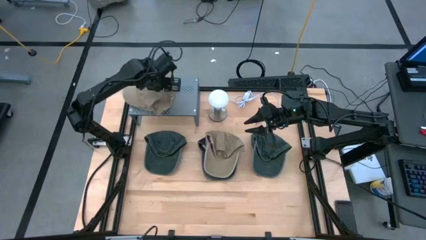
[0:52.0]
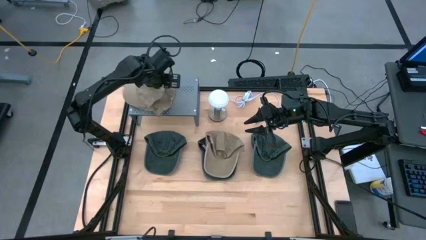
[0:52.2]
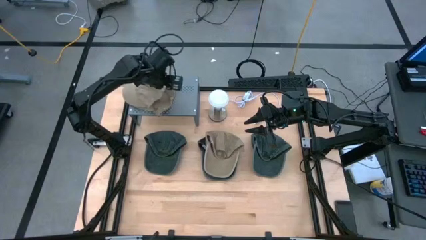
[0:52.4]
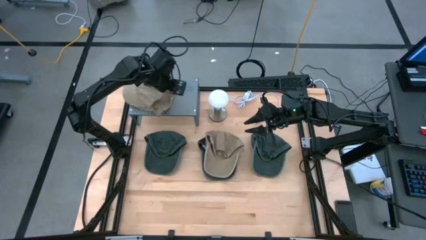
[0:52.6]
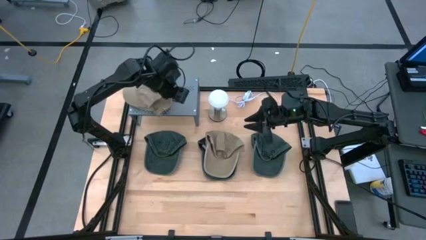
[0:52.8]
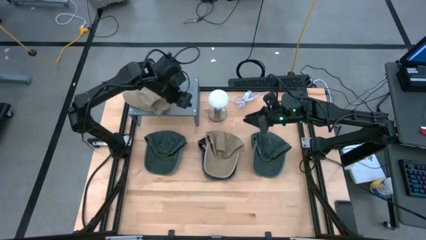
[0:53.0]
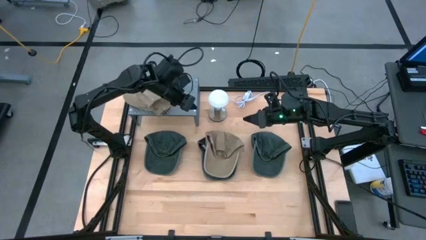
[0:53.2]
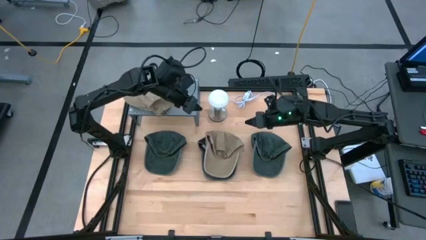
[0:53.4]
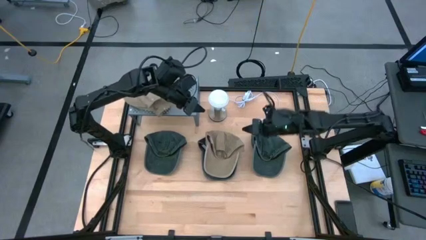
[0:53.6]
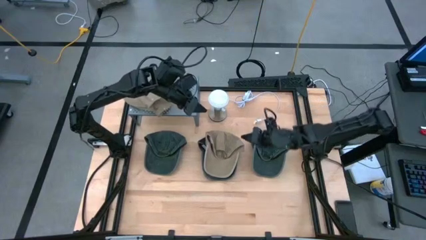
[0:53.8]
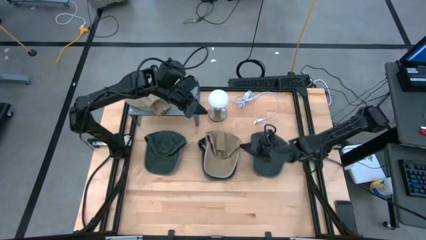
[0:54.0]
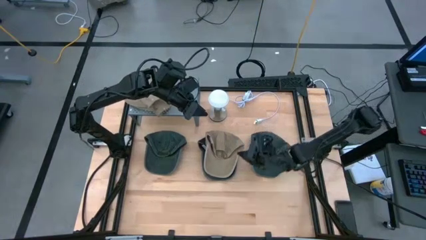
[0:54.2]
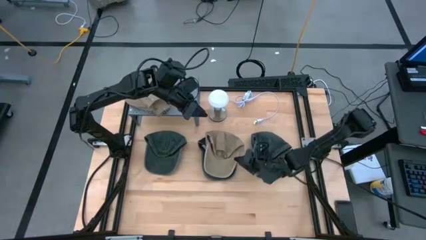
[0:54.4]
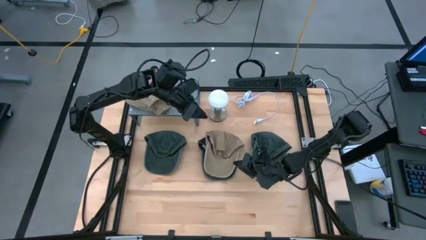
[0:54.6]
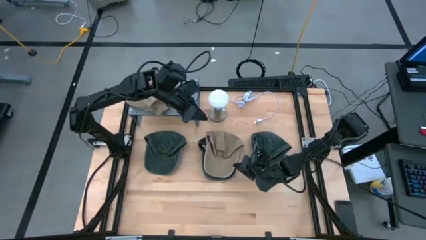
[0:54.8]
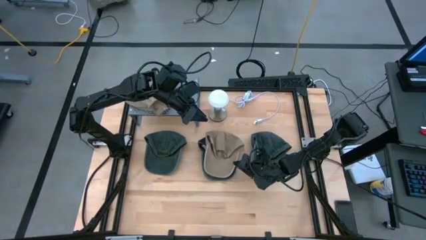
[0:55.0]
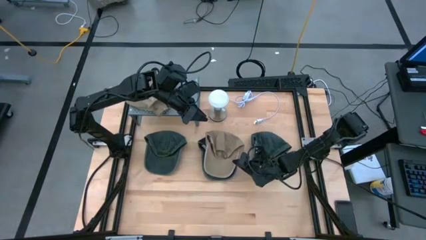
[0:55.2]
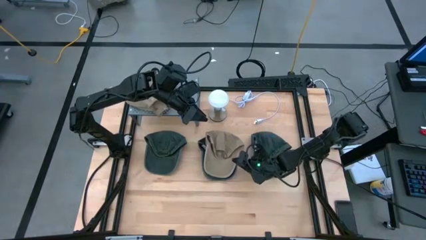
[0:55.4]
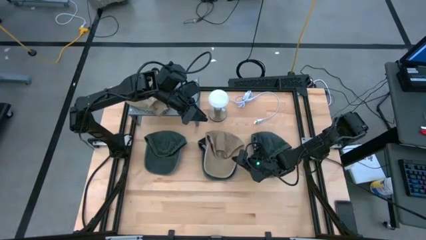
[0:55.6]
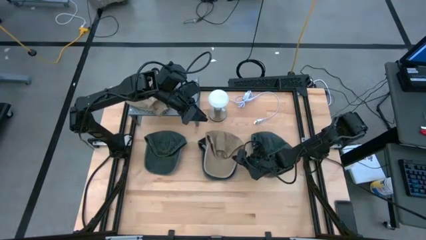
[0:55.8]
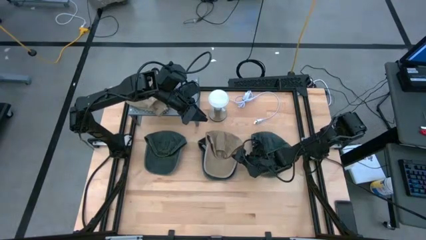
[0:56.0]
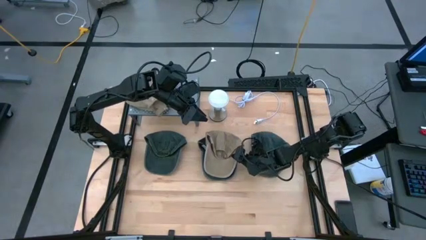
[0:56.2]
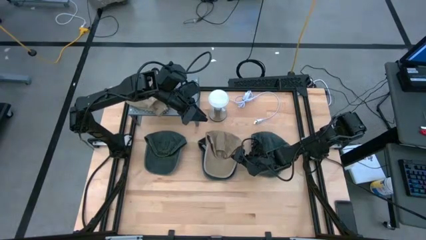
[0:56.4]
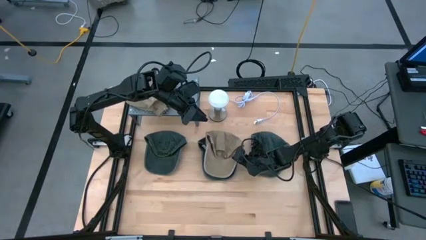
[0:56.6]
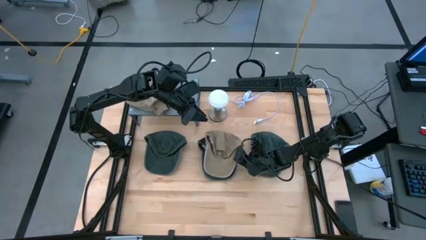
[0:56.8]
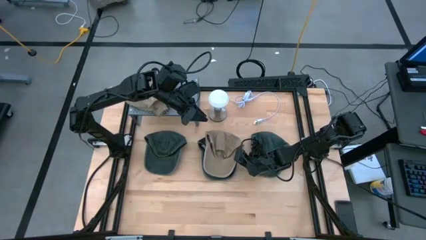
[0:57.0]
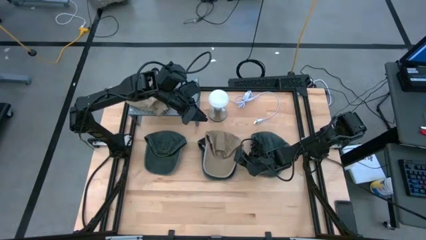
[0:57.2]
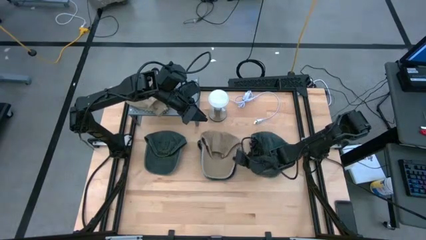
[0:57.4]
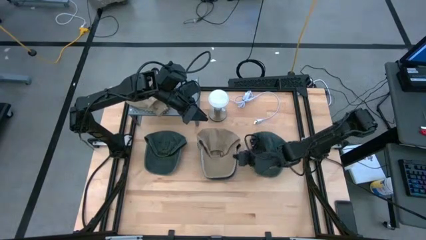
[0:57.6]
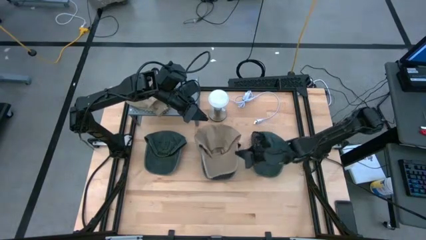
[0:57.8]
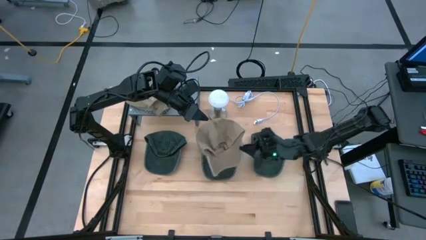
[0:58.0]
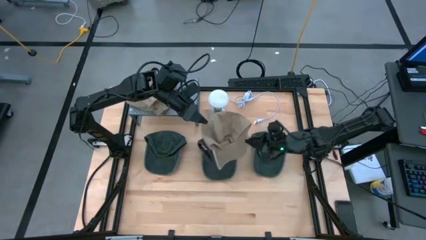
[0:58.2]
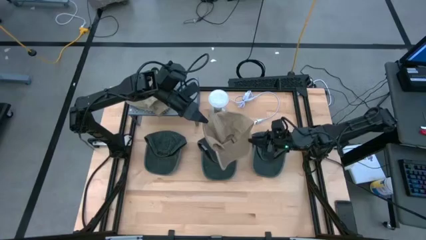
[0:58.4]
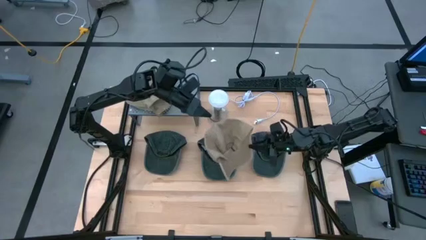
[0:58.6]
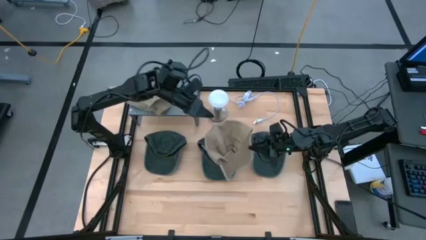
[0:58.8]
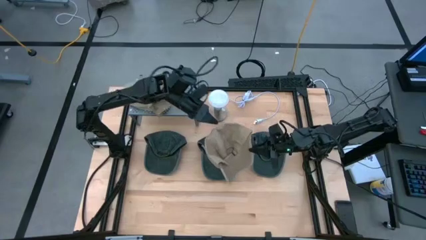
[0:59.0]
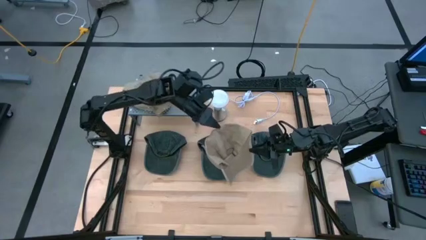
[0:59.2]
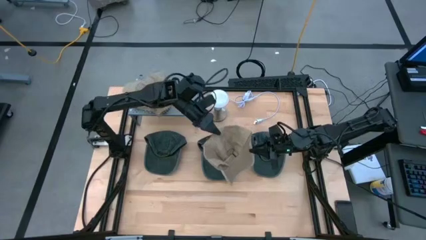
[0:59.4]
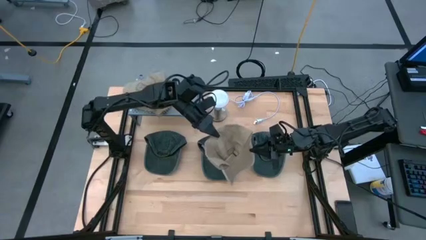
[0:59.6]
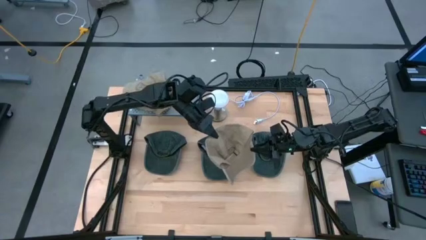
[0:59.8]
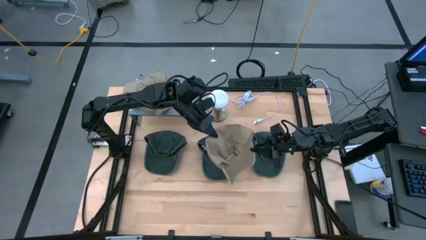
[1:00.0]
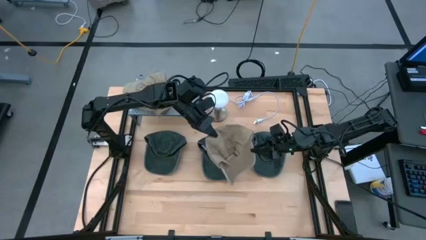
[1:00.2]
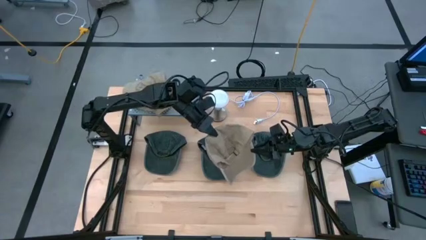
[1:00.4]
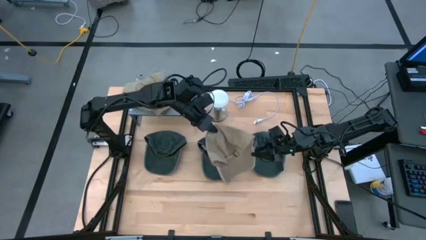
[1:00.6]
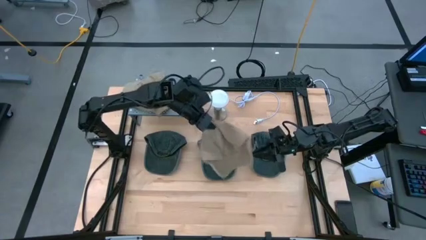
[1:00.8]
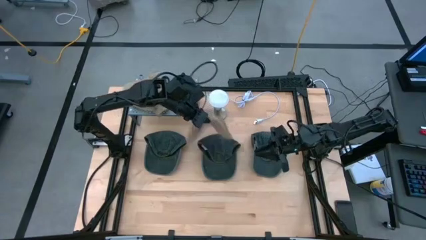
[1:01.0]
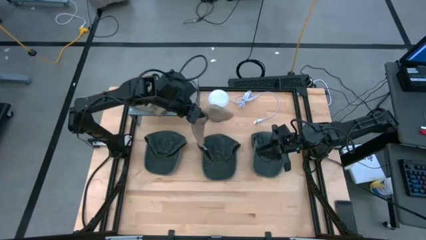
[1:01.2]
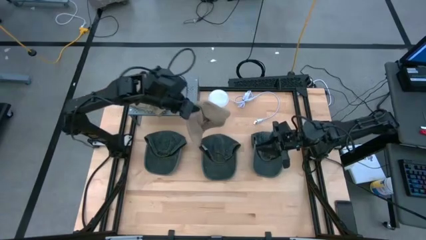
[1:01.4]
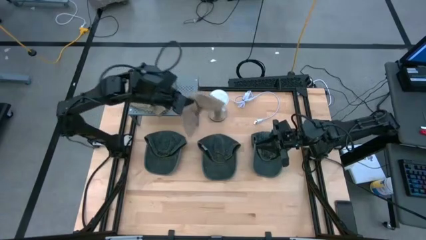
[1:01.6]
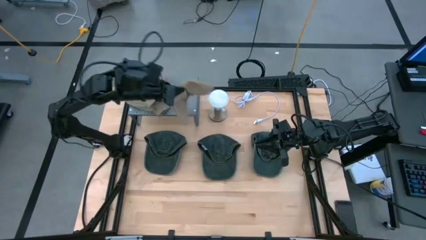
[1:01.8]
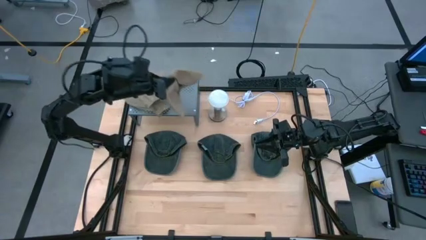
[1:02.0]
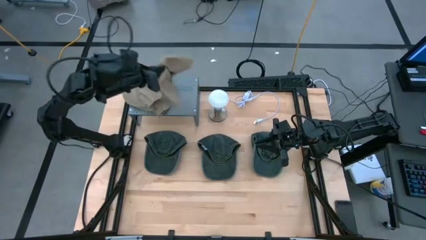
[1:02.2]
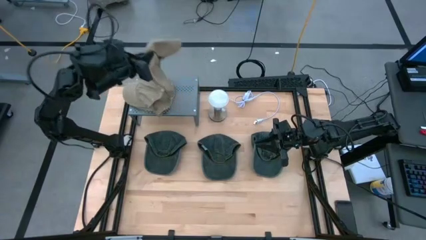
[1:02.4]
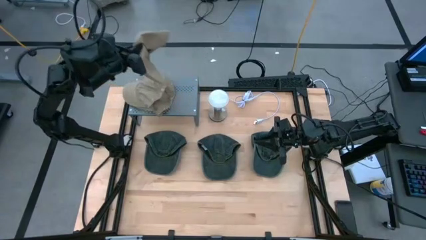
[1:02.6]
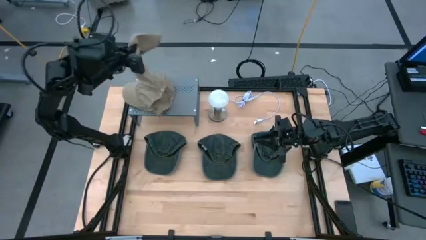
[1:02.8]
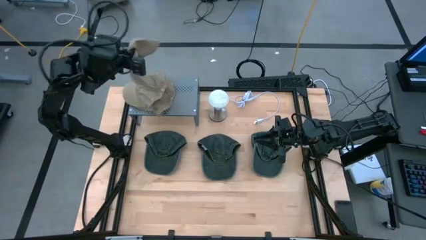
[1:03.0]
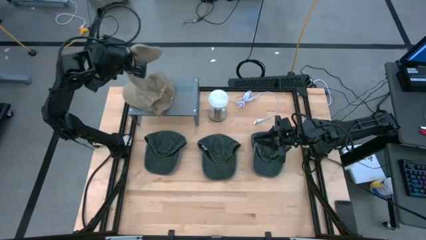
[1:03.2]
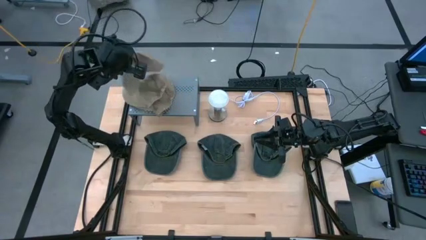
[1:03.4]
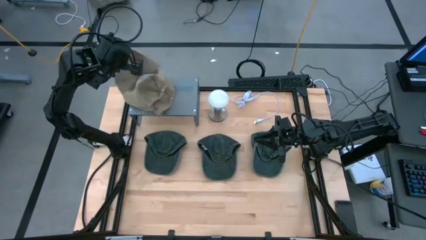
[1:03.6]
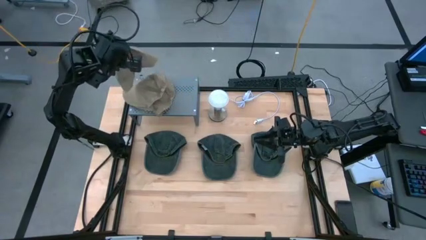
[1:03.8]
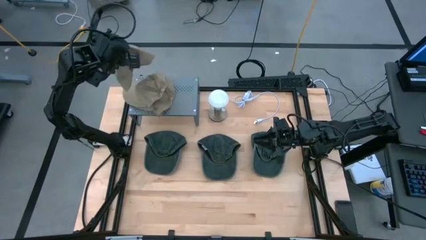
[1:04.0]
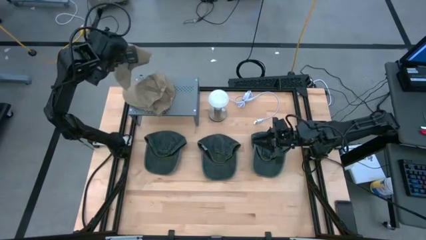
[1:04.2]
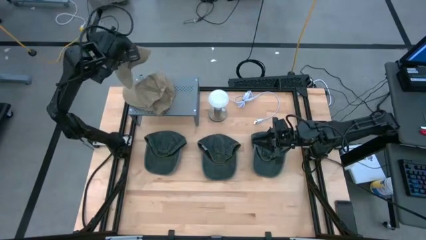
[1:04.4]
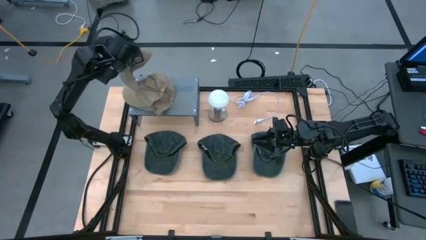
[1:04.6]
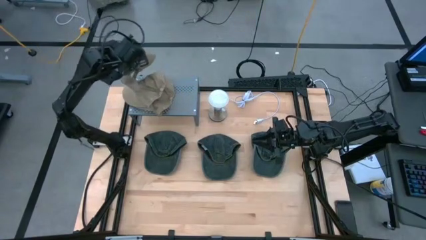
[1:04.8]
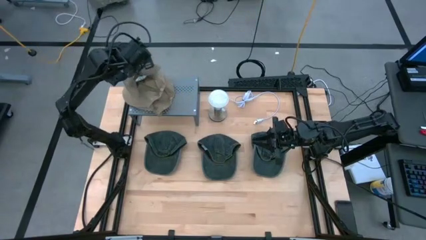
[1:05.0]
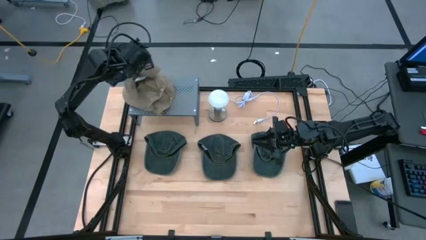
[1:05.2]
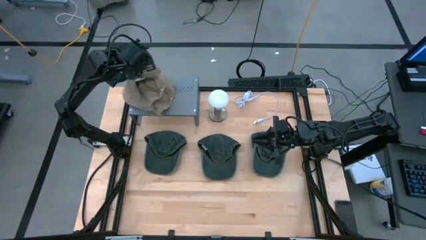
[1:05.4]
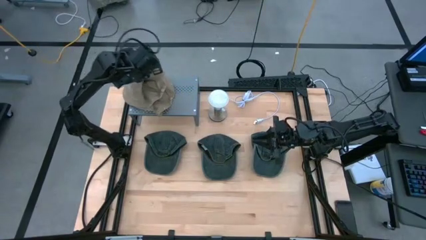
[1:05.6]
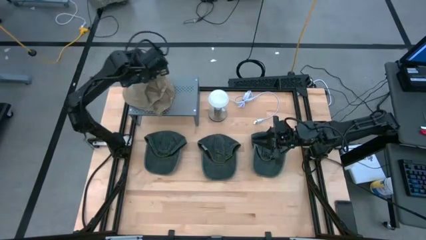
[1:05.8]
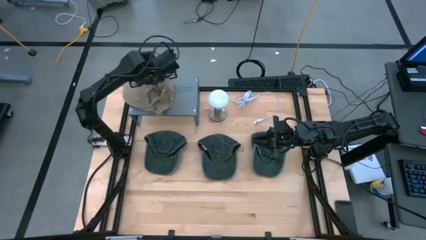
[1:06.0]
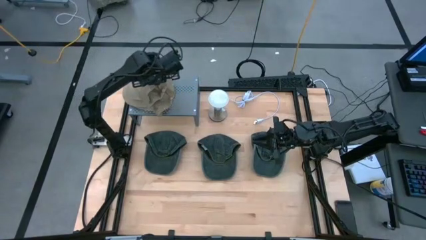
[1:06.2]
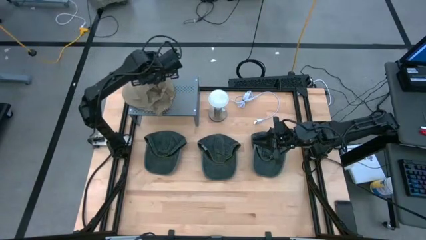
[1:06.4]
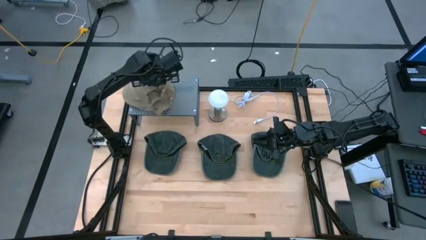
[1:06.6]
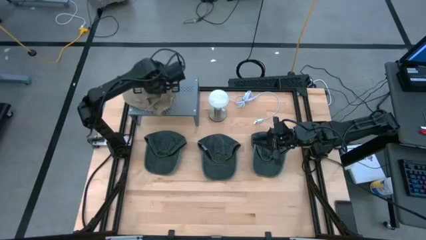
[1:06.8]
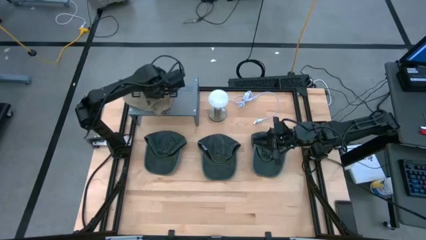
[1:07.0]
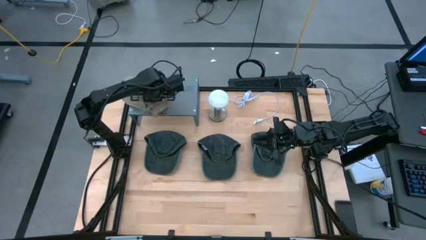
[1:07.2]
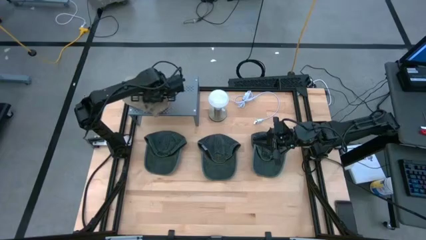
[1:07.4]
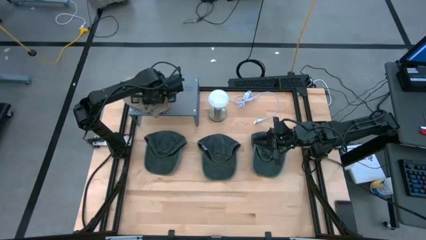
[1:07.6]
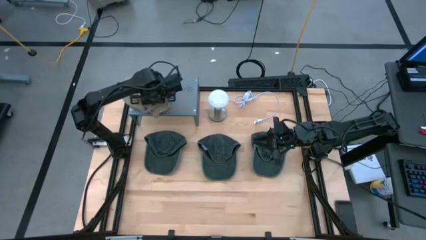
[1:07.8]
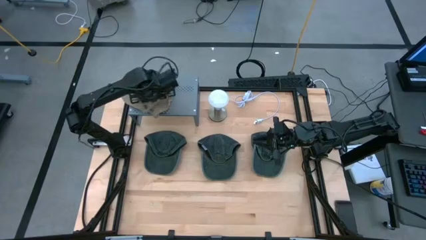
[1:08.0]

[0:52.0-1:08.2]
Task: Pick & Place hat
Stack the brown cap on the stacked brown caps on the shelf
